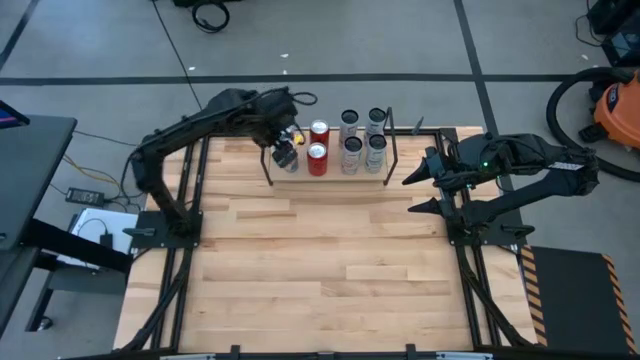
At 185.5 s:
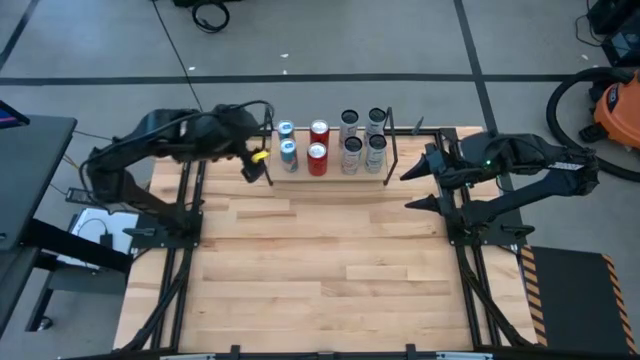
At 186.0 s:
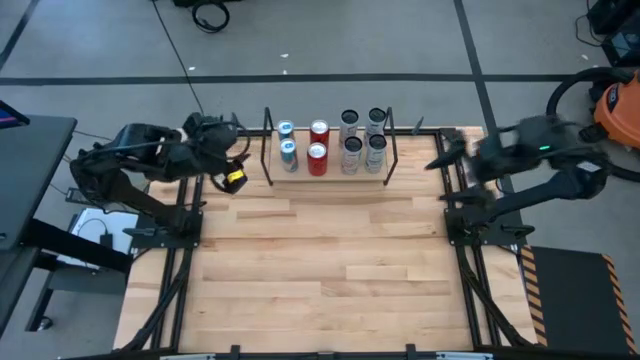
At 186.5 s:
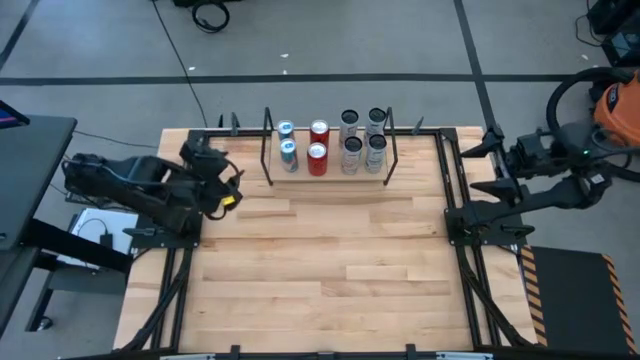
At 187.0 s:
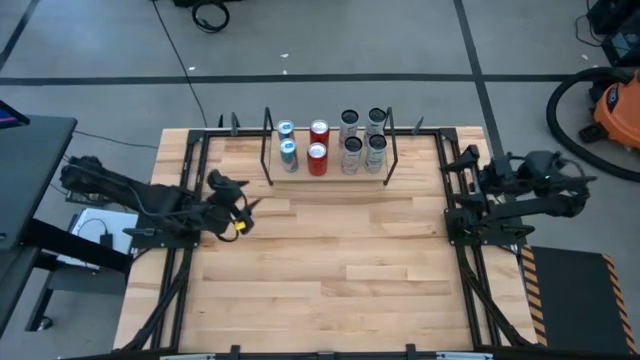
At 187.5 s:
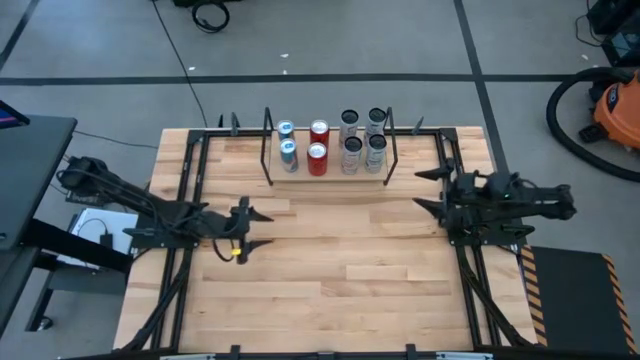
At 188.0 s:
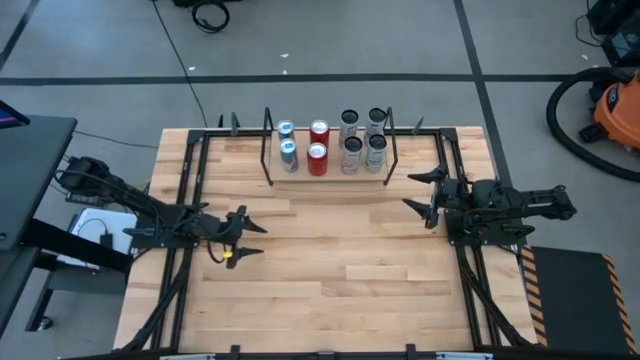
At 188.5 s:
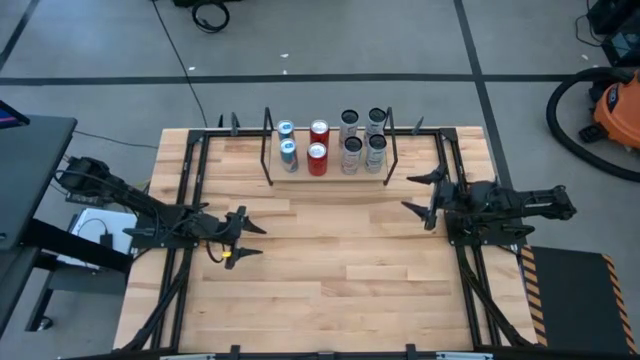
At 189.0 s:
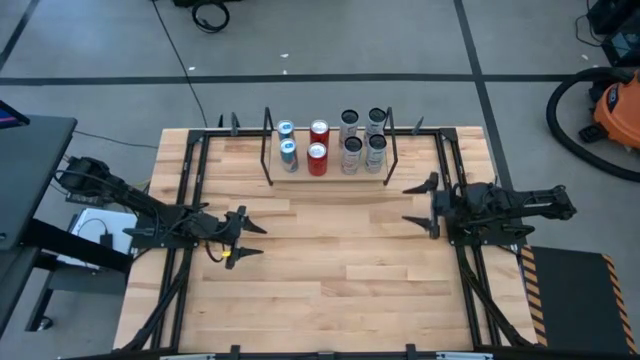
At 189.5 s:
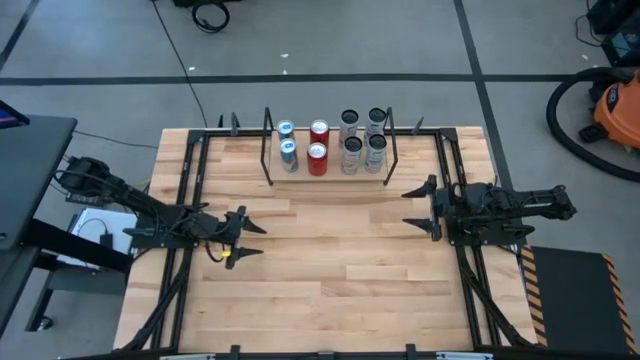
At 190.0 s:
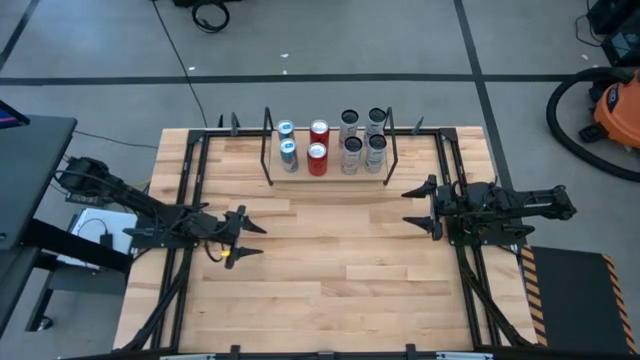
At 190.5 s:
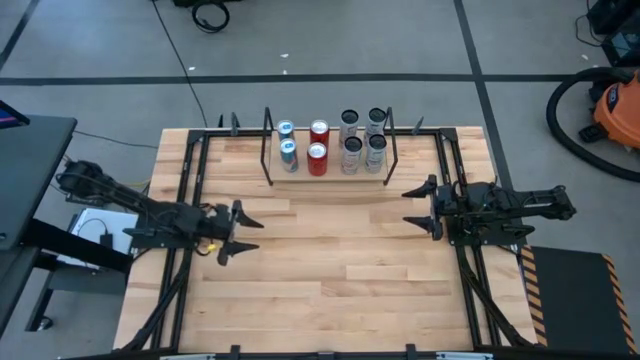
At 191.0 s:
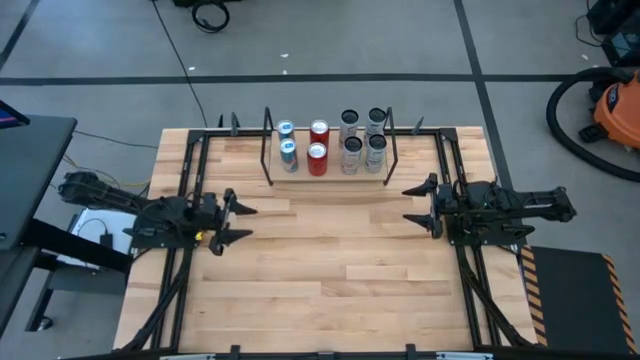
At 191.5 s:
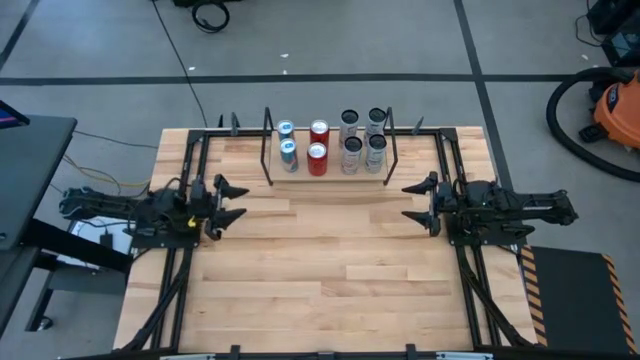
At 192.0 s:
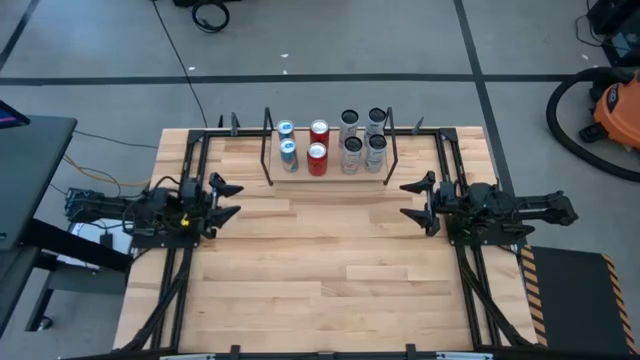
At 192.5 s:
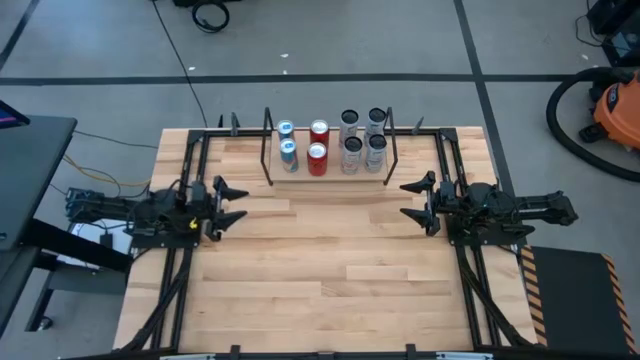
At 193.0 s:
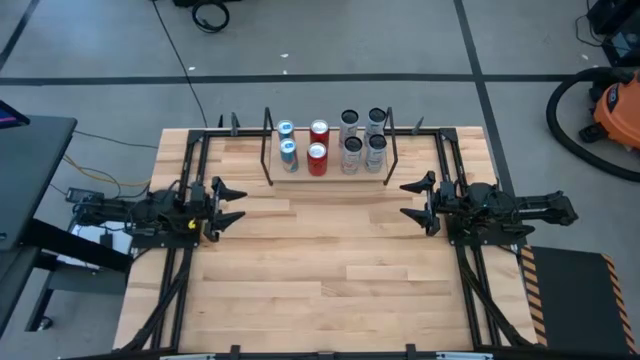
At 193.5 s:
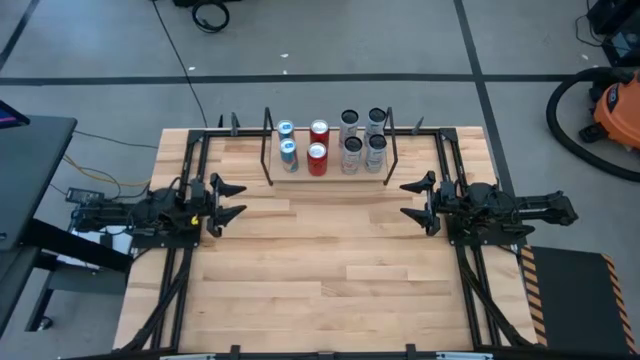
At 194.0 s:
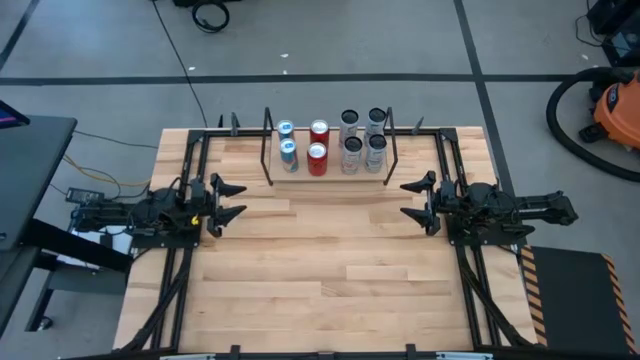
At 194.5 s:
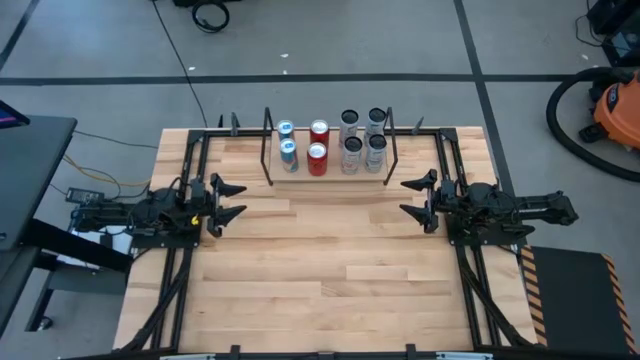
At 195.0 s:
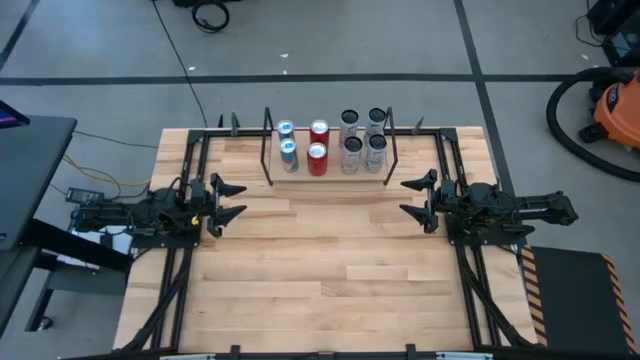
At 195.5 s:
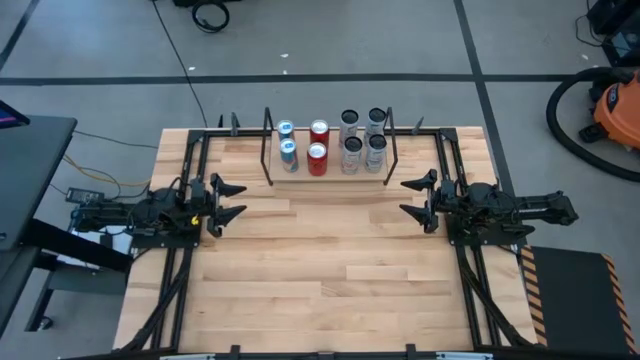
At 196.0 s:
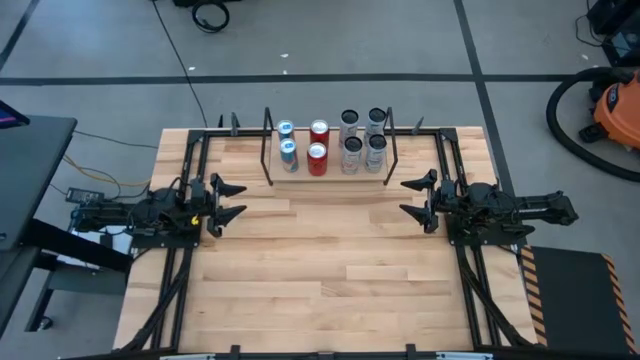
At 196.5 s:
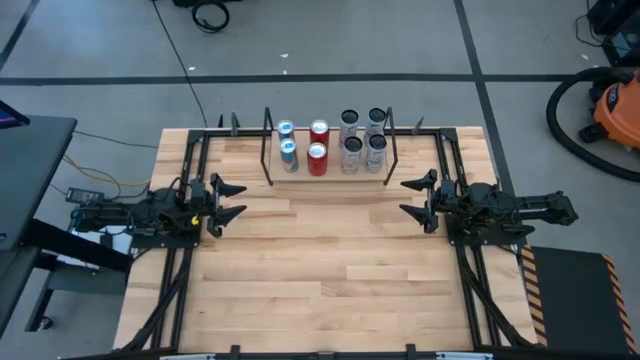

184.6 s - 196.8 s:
Task: Place canned beverage on shelf
Return to Home Position

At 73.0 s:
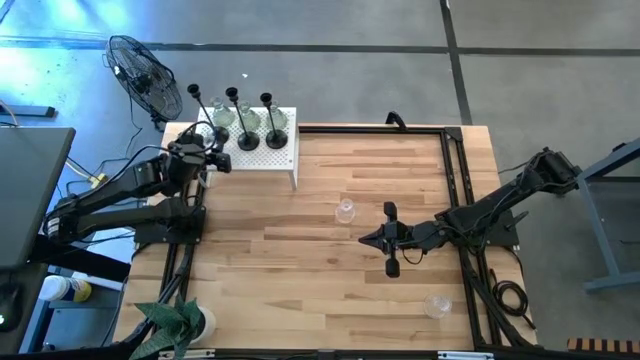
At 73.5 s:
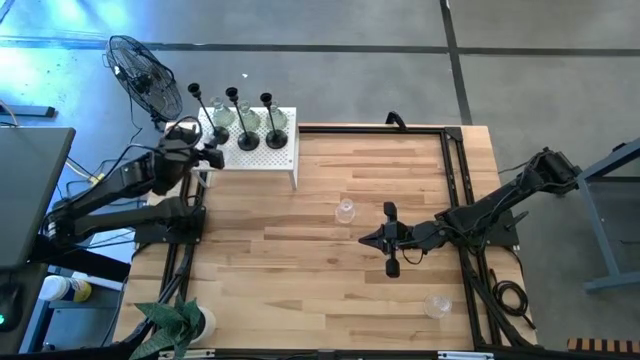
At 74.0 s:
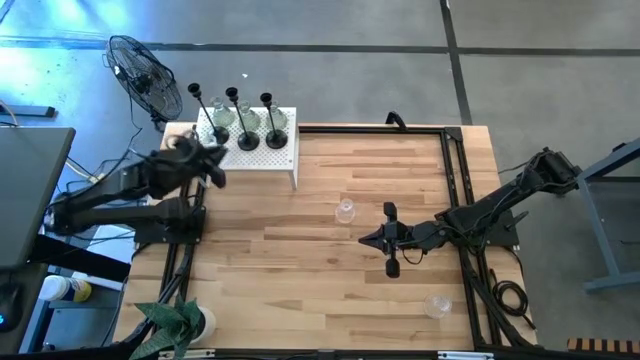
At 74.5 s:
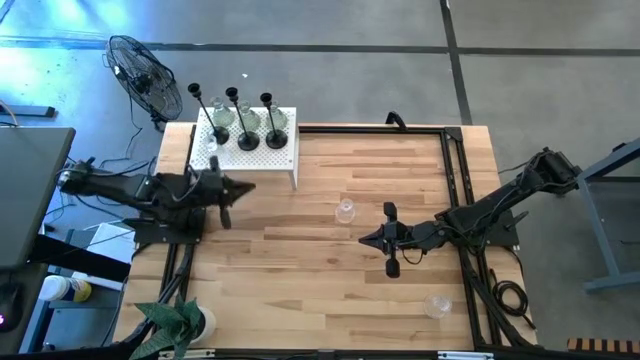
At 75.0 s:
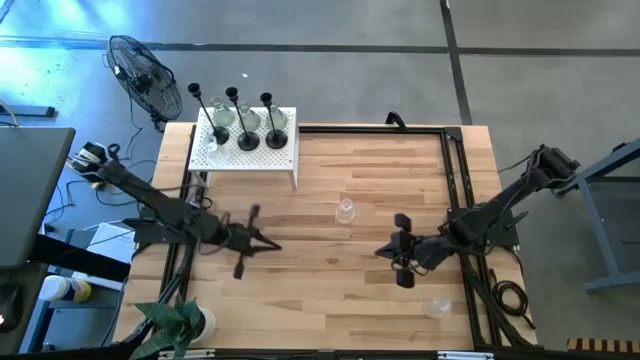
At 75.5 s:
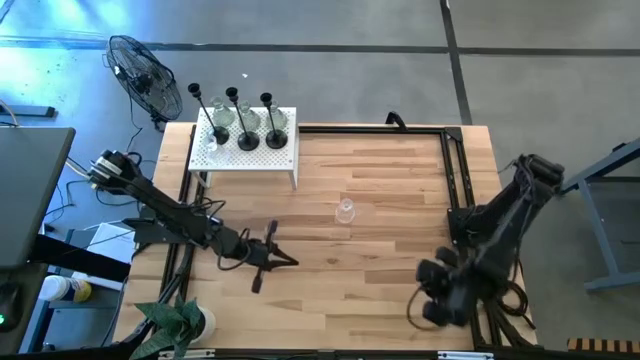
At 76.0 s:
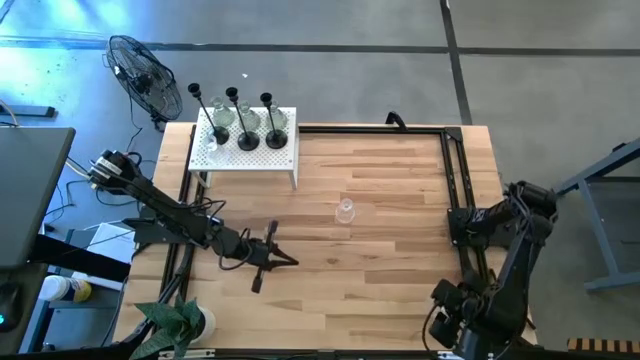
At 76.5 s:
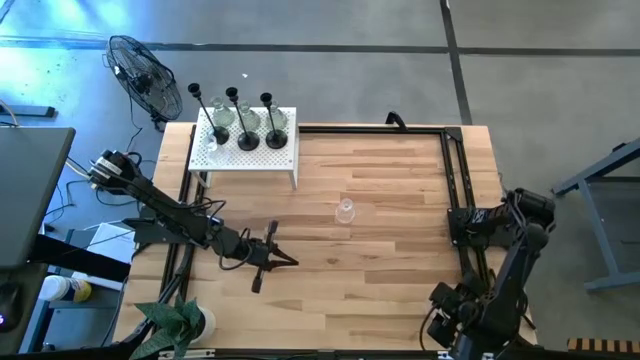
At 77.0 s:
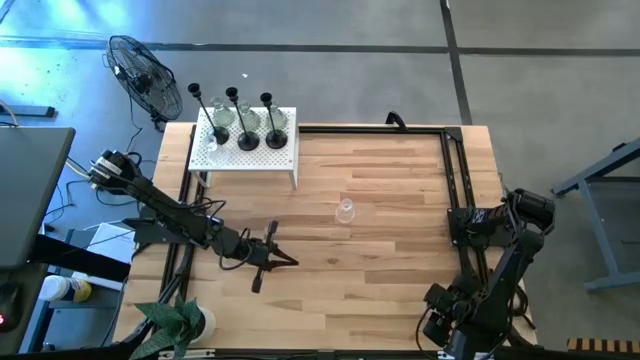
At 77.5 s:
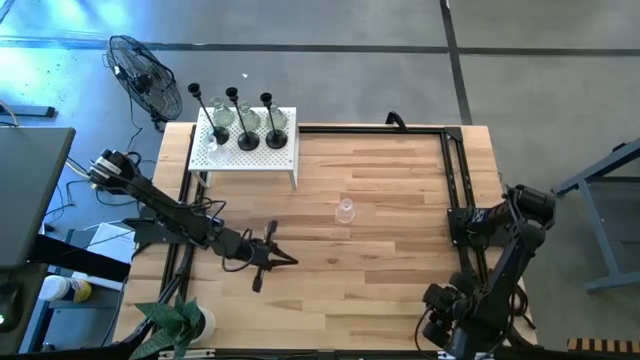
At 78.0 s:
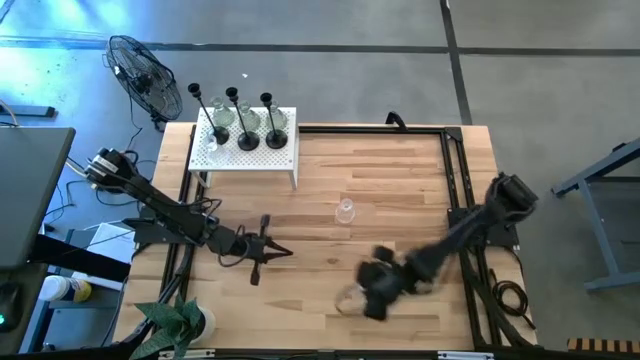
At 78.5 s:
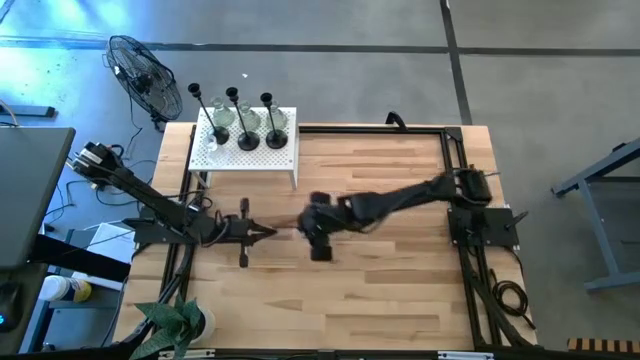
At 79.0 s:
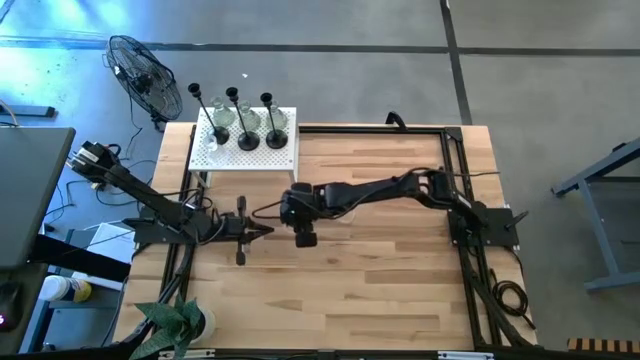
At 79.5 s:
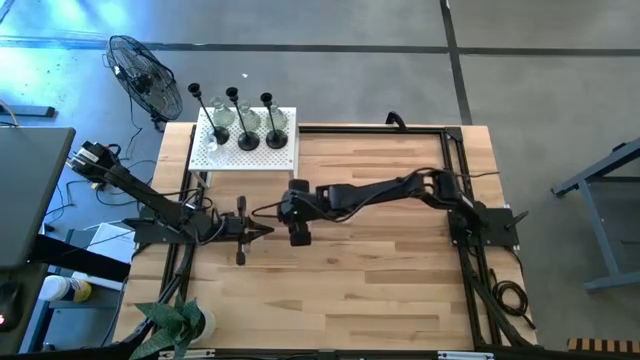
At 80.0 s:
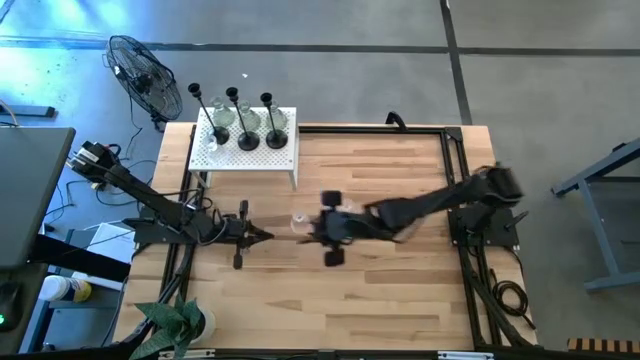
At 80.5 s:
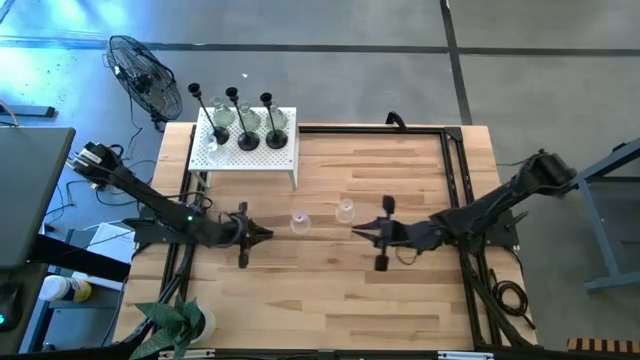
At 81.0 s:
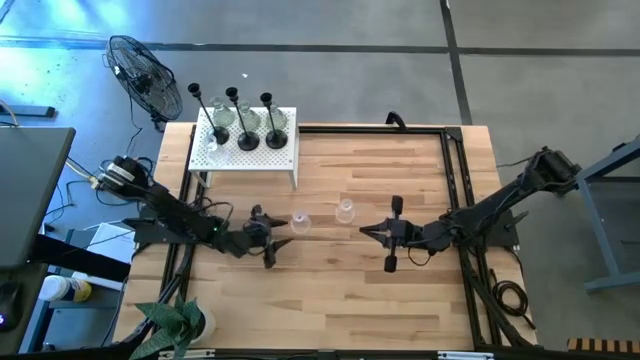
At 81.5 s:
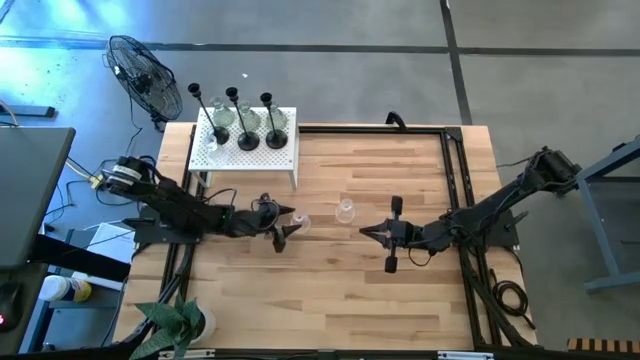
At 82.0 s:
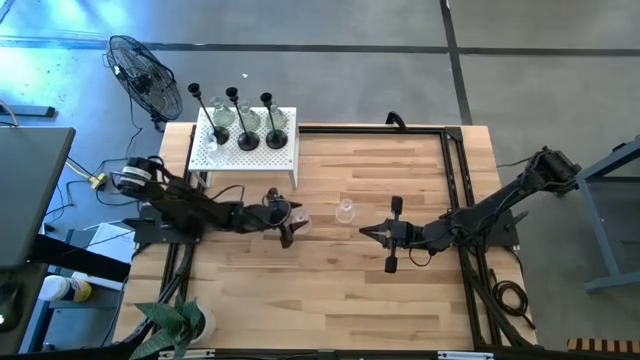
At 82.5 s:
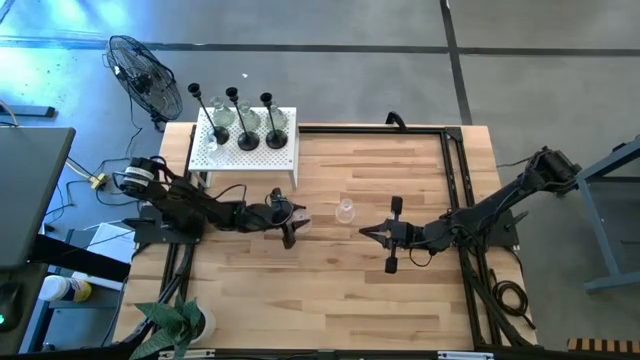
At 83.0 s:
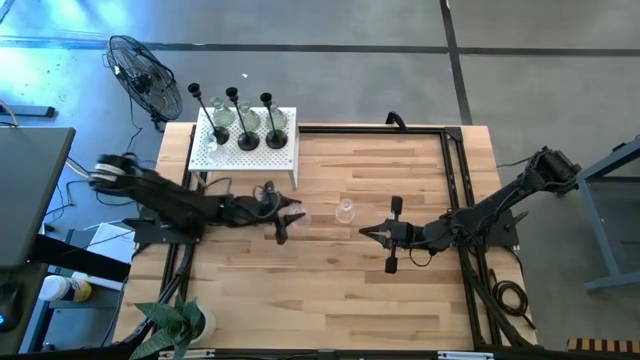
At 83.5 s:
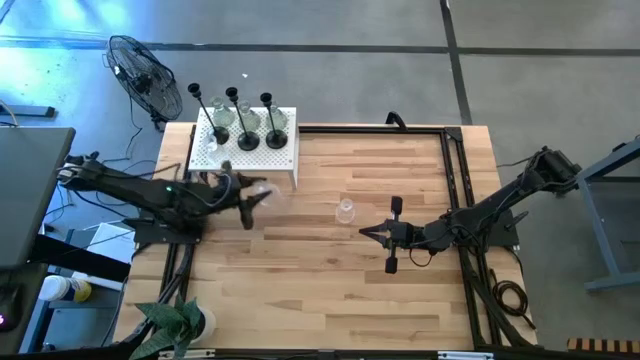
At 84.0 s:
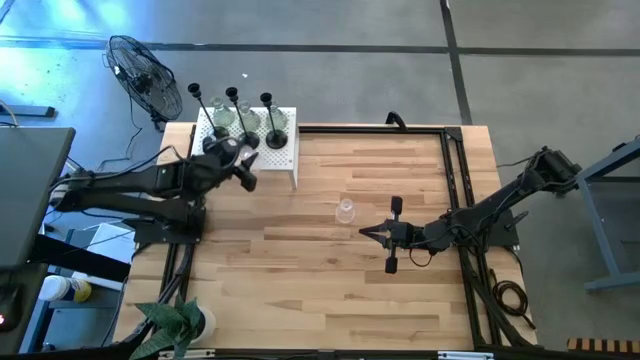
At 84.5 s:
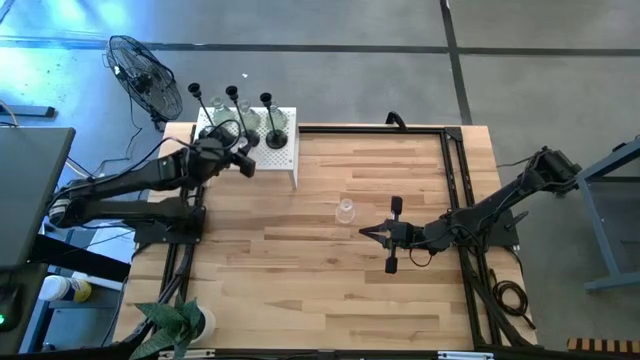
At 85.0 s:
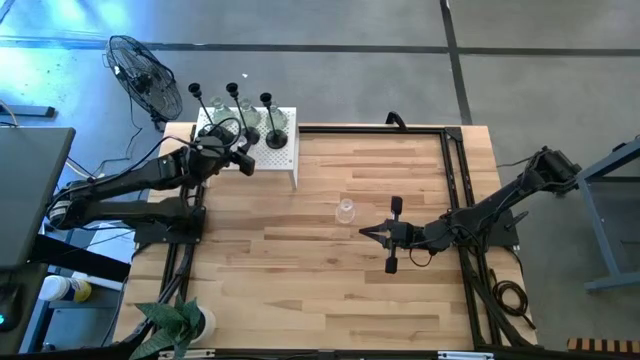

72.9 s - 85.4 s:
Task: Pick & Place candle stick holders
Put the bottom transparent glass candle holder on the shelf aligned with the other transparent glass candle holder
